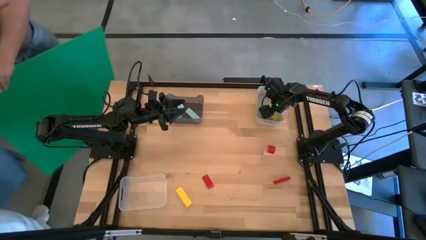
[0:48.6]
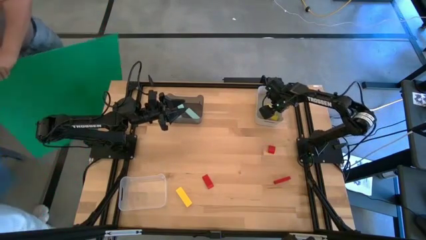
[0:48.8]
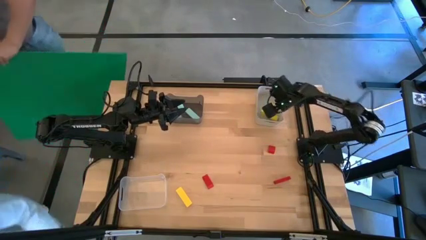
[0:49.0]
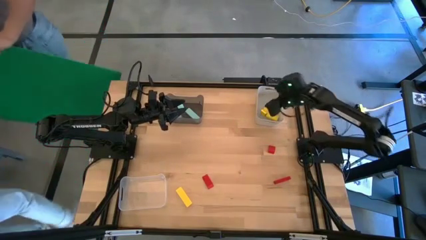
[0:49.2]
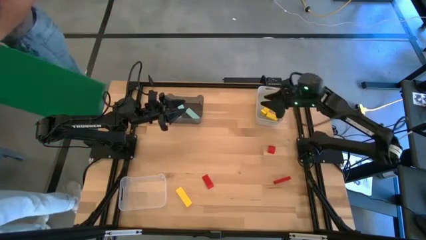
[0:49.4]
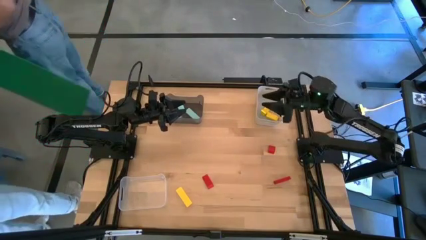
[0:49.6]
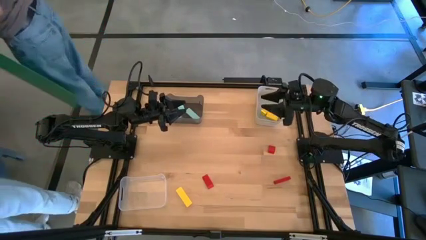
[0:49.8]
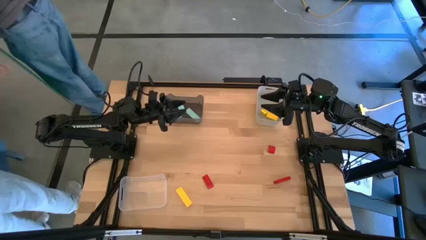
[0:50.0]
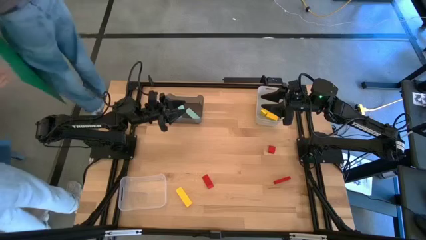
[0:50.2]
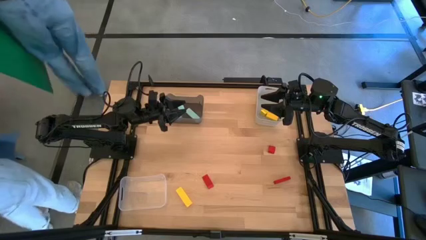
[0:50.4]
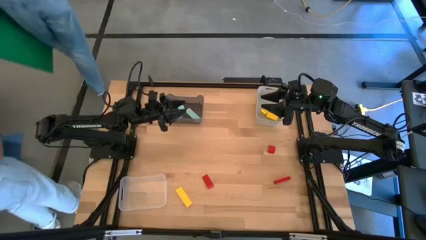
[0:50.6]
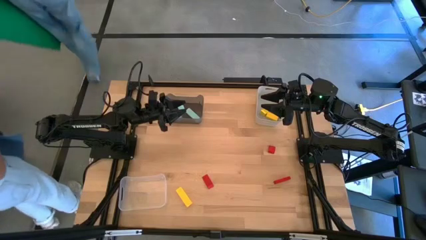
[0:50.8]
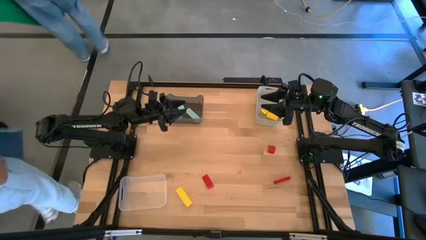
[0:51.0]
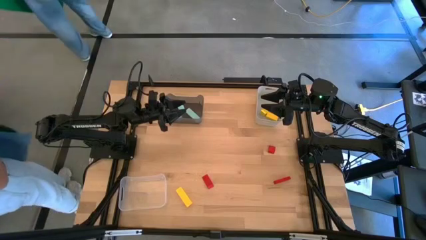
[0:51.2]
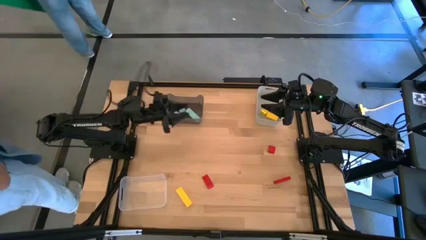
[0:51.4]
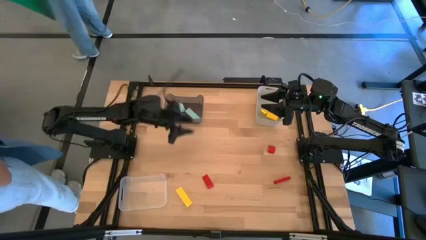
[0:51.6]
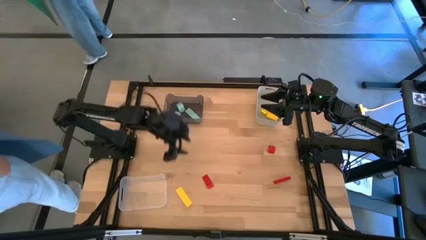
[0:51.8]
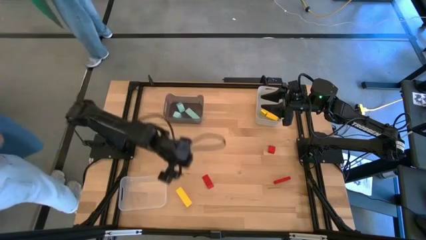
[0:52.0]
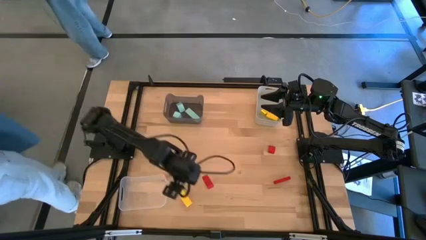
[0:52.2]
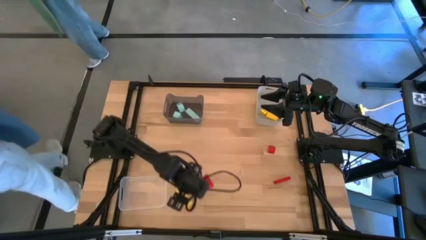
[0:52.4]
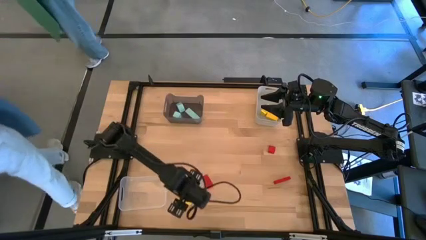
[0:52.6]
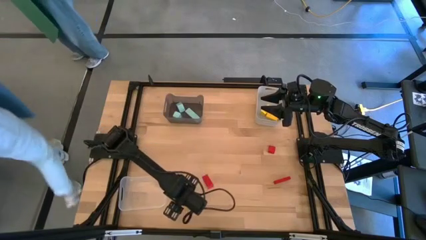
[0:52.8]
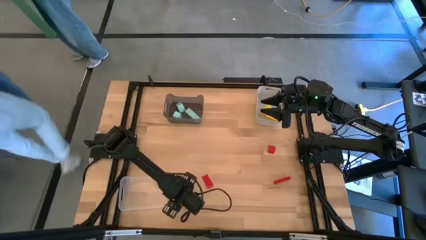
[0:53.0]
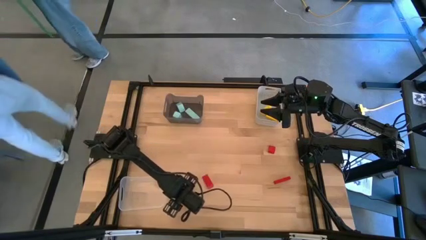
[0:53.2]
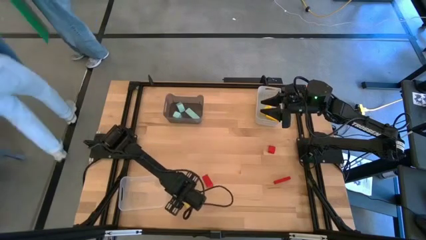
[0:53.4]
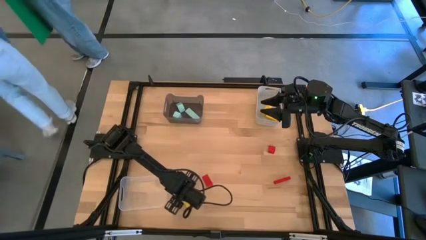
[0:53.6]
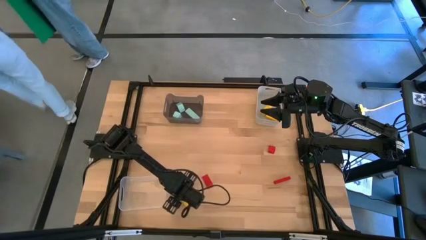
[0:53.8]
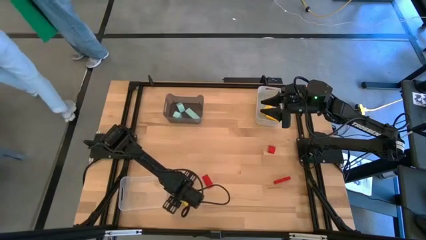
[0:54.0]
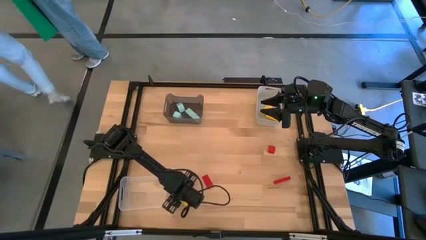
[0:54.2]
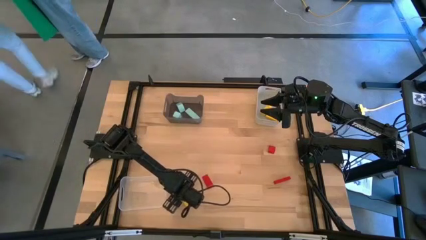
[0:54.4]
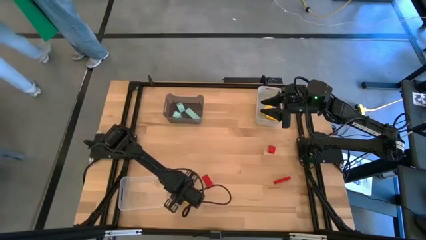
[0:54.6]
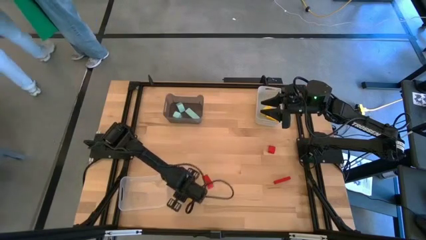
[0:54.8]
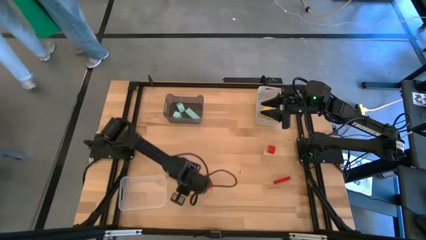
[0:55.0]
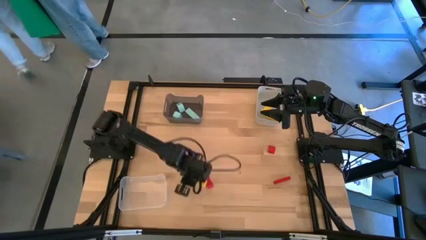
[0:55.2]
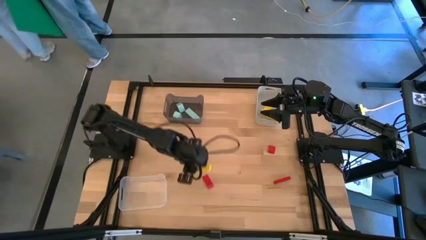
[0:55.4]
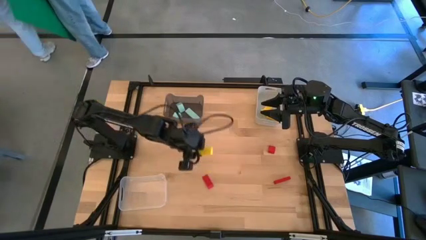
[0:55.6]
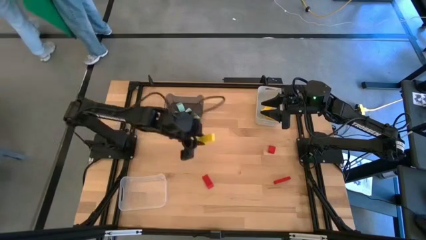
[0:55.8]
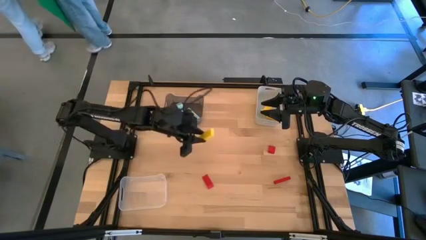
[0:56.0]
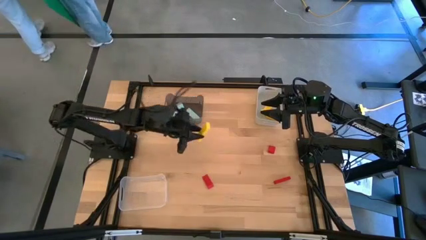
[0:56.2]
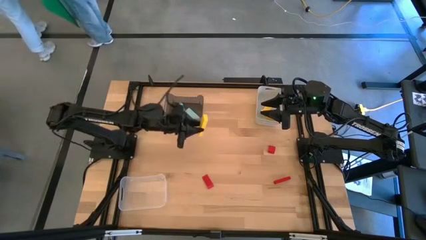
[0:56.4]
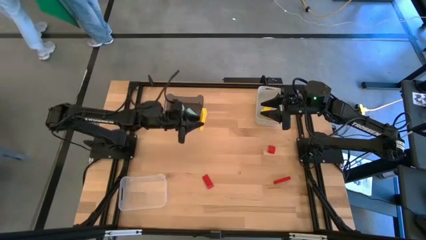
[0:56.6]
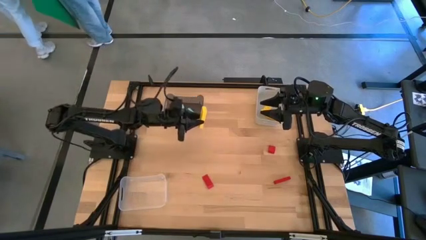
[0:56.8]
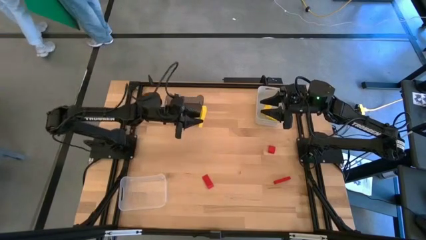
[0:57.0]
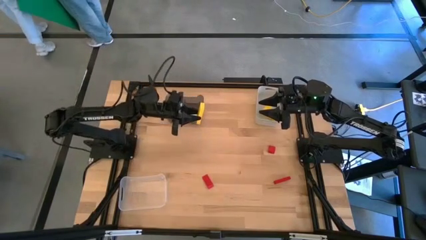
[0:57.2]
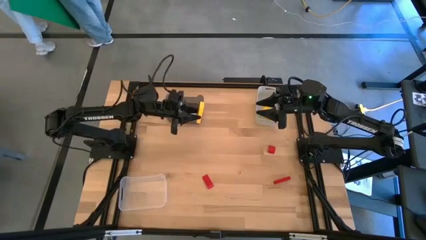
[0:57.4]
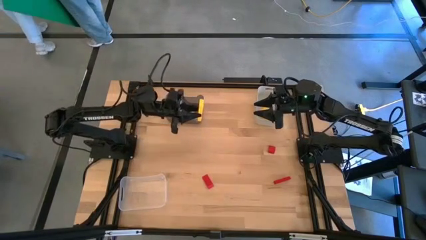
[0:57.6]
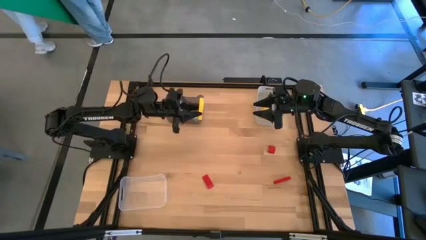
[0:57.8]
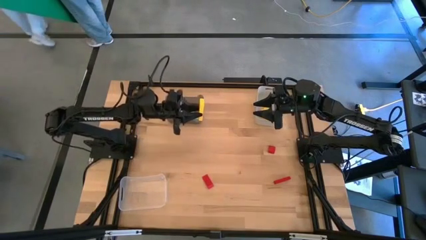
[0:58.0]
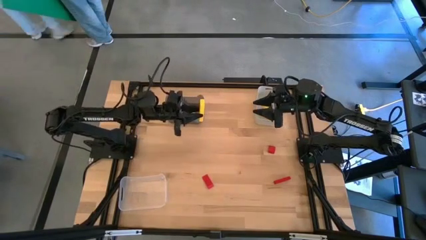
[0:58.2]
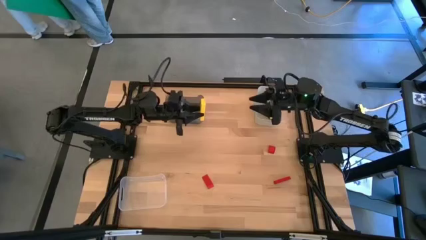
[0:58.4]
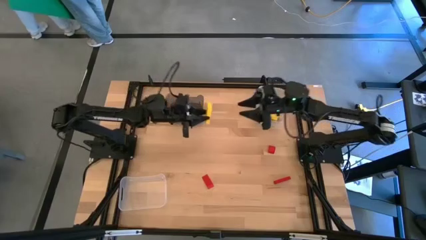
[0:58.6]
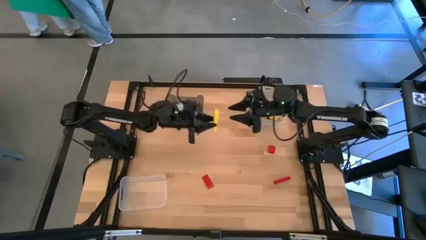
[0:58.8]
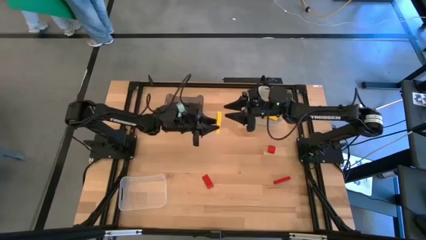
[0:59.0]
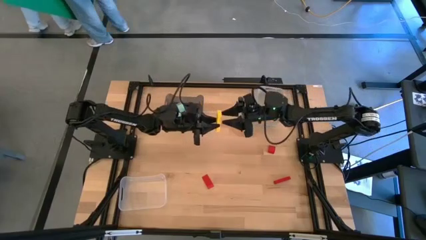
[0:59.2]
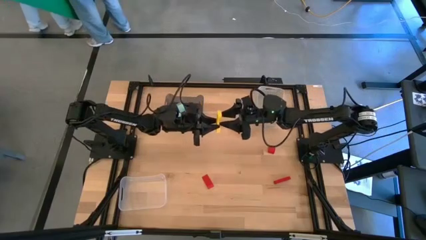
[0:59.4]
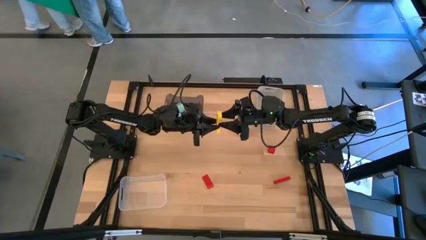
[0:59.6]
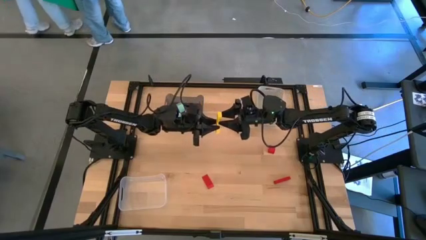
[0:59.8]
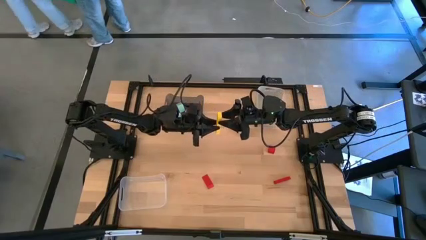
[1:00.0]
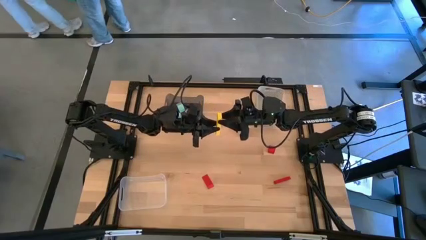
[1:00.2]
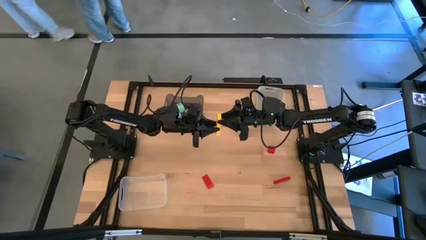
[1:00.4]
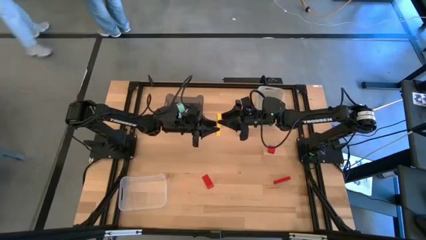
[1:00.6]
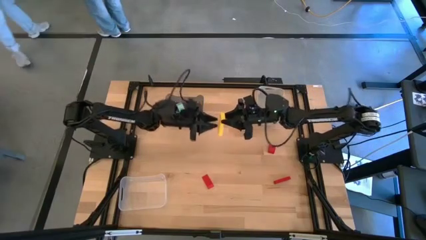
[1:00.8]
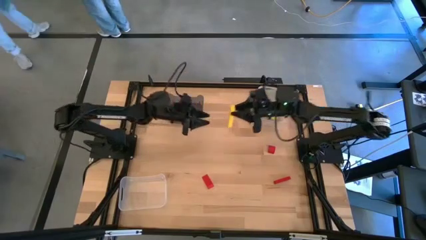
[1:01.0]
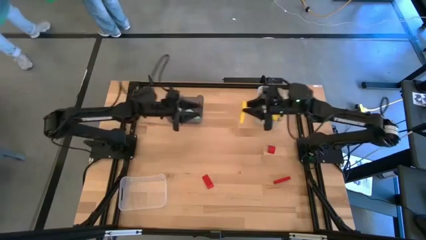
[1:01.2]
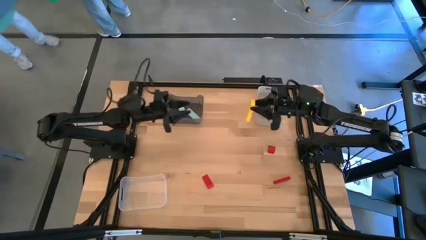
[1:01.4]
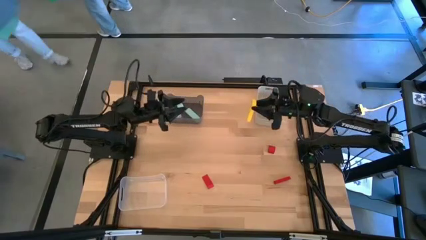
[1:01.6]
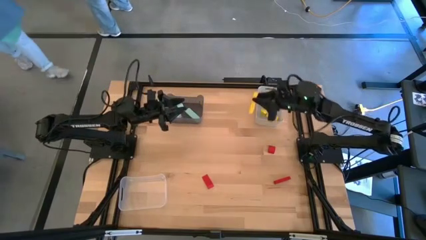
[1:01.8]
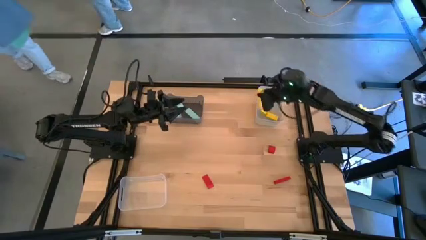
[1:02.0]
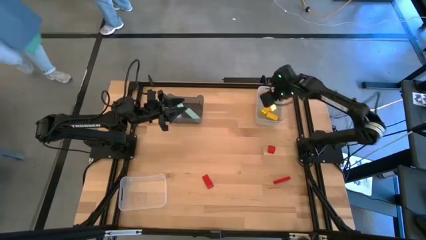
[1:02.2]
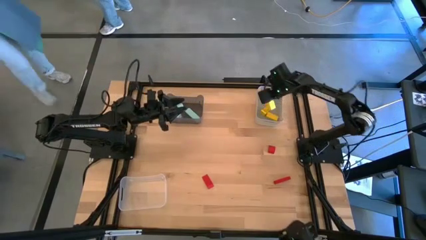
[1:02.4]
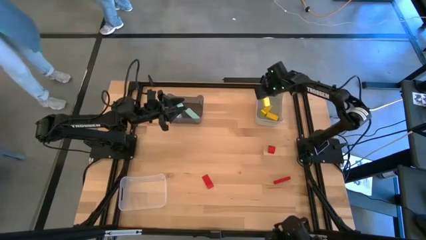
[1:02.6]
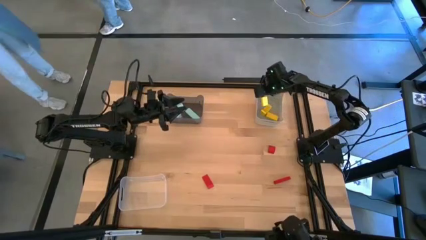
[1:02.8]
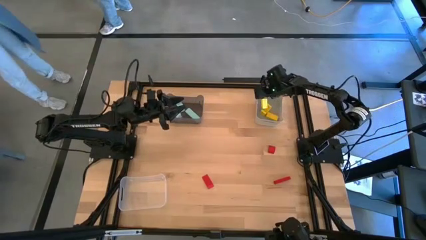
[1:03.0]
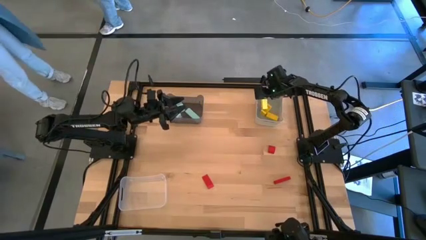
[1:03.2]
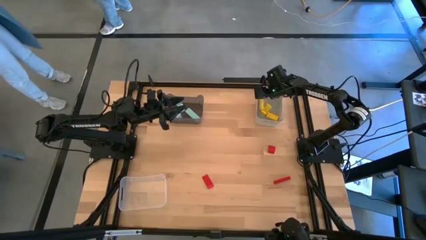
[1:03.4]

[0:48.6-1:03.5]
Task: Sort & place blocks by color
Put the yellow block into the gray bin

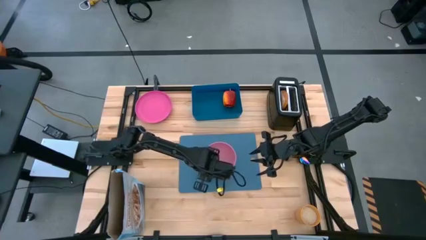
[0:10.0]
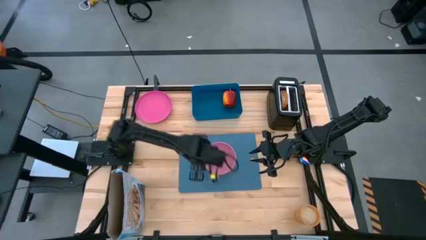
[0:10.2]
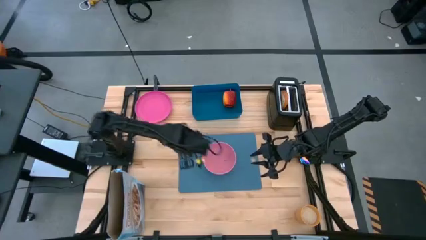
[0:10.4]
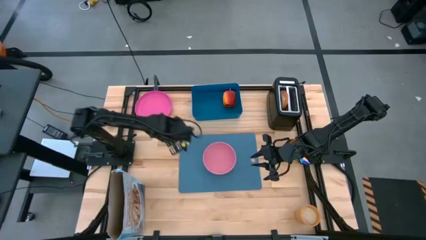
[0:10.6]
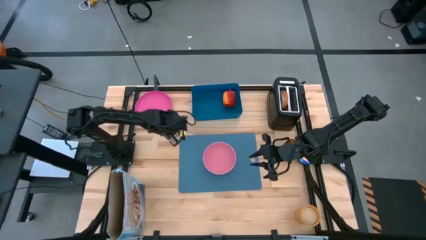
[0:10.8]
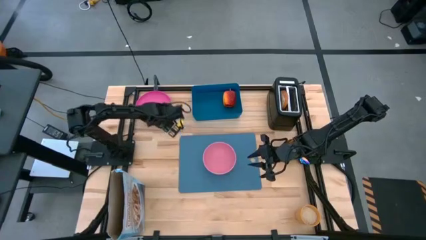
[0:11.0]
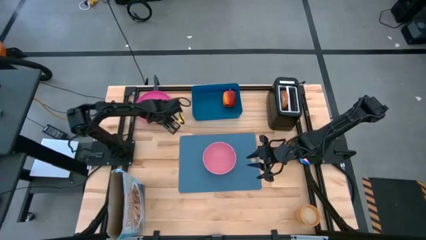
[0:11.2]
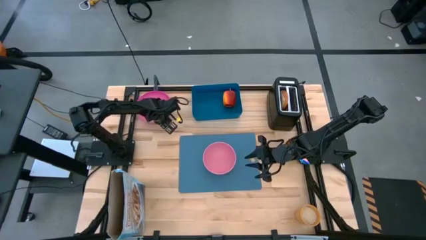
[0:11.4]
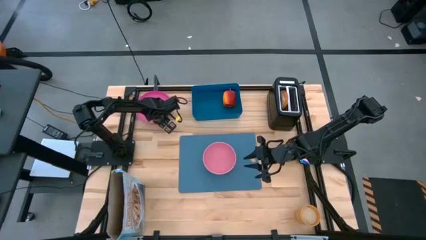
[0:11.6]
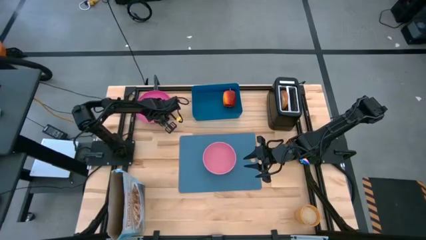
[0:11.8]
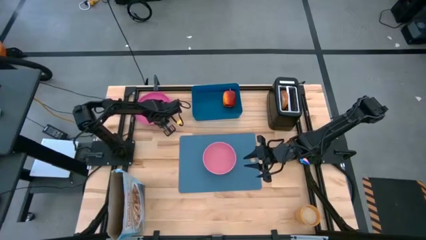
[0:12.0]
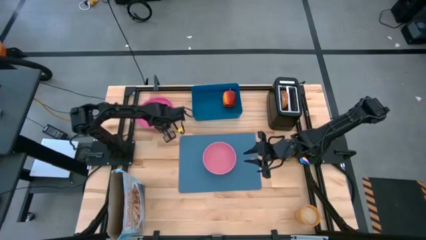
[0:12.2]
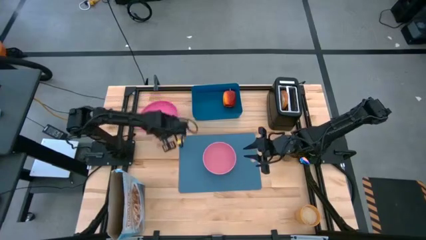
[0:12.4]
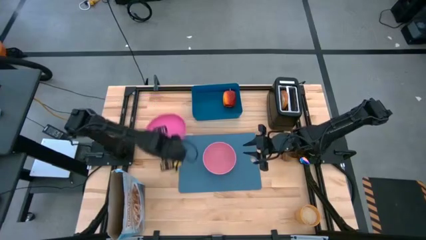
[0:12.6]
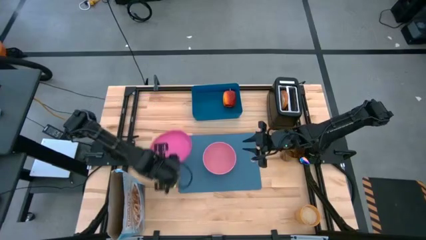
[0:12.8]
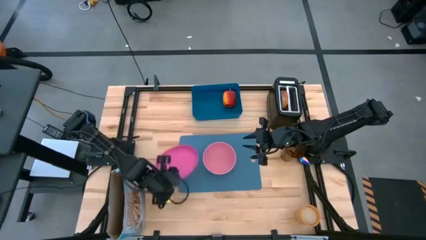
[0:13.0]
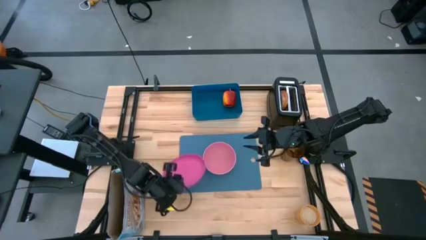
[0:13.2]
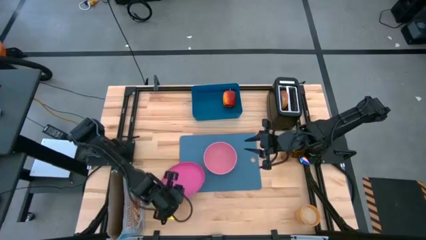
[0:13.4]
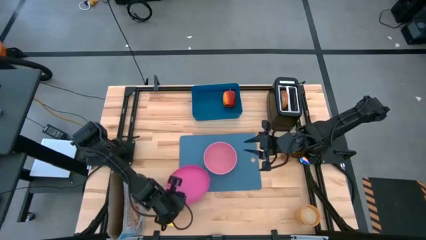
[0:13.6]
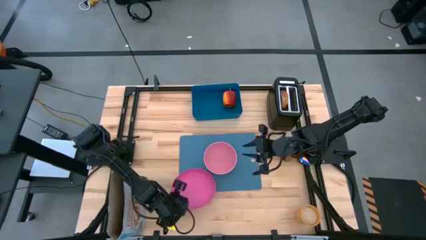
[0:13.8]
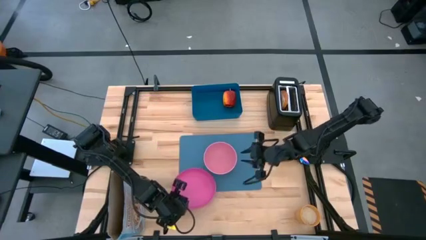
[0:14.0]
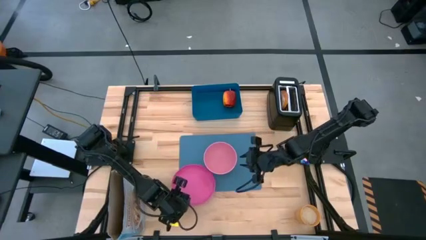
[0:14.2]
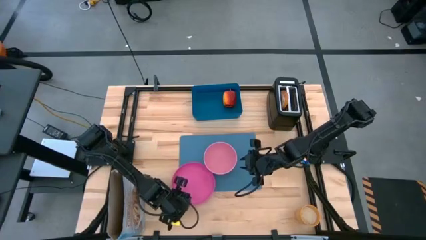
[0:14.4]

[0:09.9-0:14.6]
Task: Arrange a breakfast setting
Put the pink plate on the bottom left side of the blue tablemat
